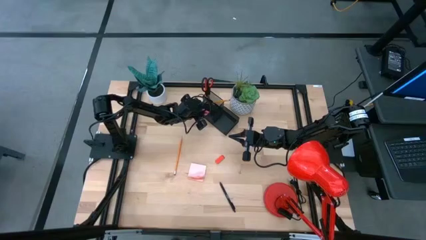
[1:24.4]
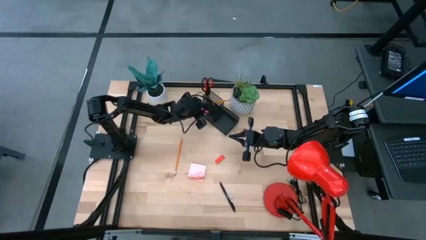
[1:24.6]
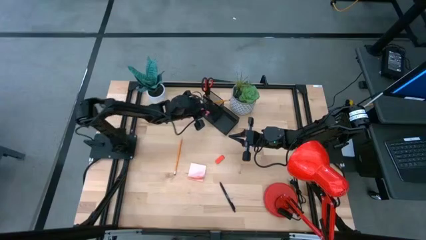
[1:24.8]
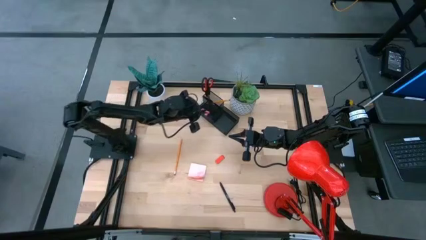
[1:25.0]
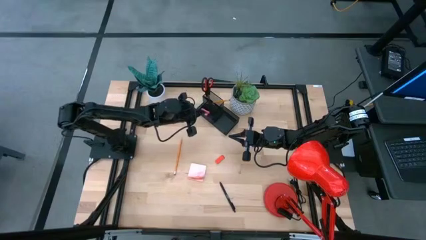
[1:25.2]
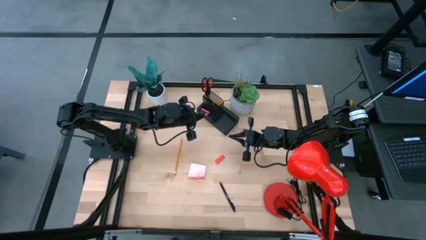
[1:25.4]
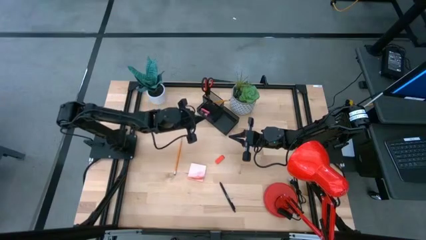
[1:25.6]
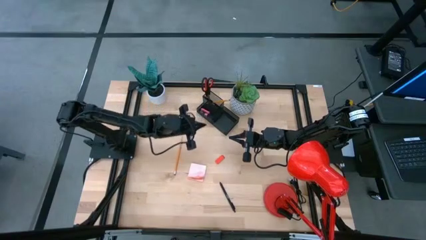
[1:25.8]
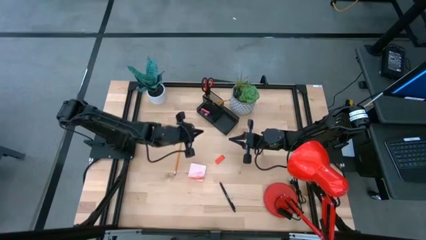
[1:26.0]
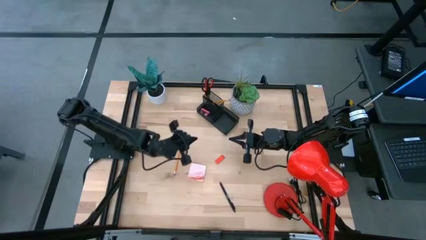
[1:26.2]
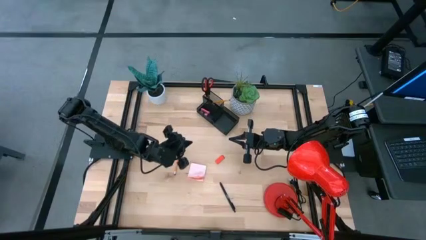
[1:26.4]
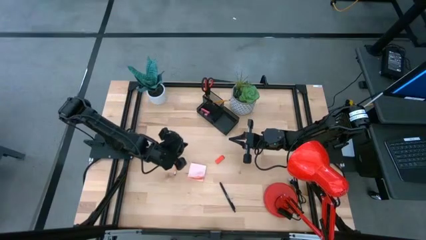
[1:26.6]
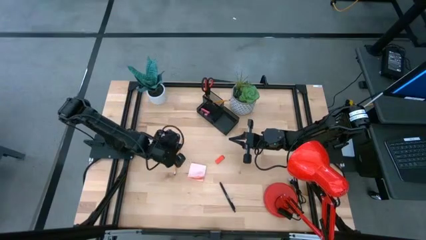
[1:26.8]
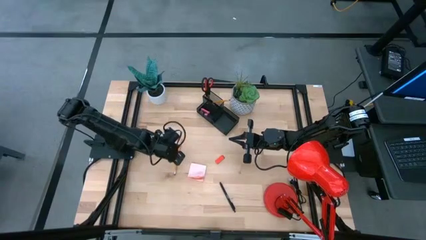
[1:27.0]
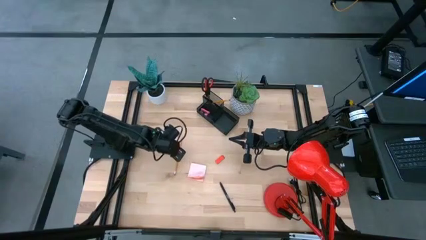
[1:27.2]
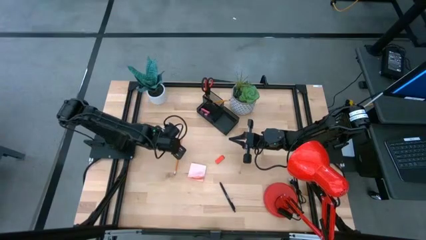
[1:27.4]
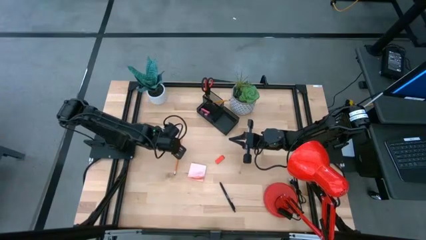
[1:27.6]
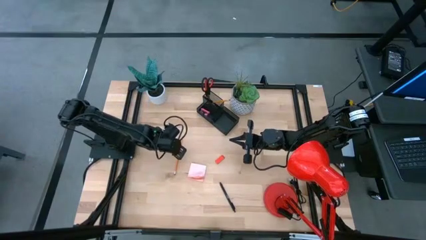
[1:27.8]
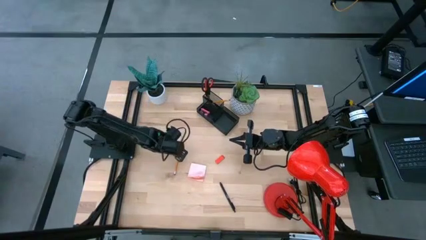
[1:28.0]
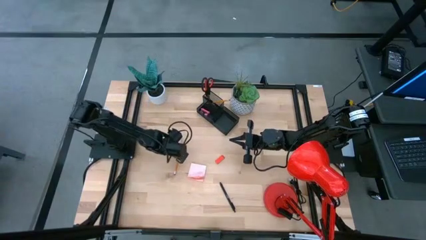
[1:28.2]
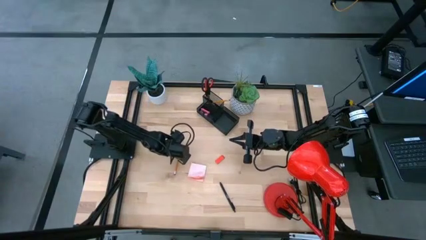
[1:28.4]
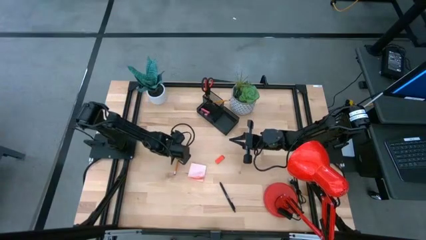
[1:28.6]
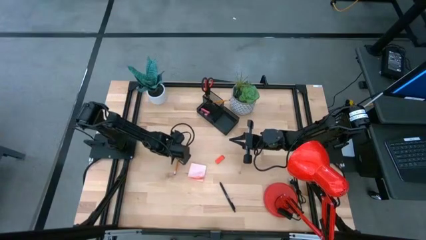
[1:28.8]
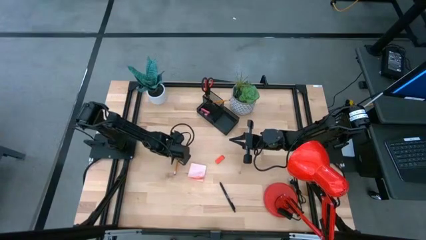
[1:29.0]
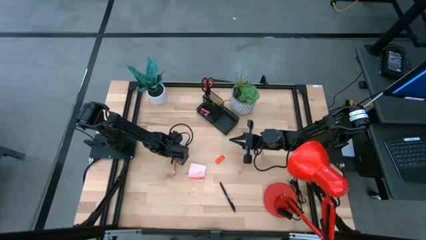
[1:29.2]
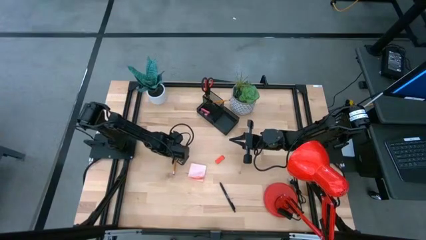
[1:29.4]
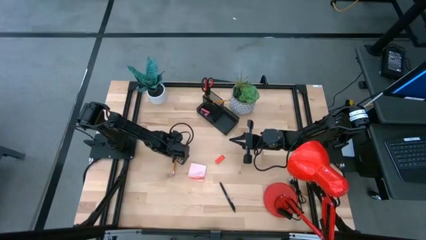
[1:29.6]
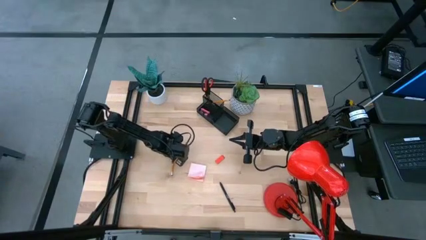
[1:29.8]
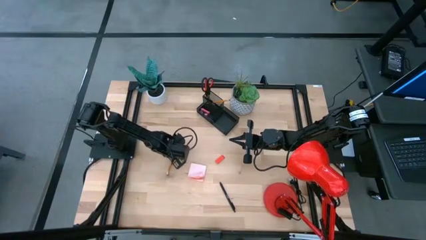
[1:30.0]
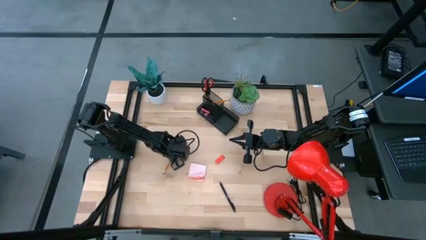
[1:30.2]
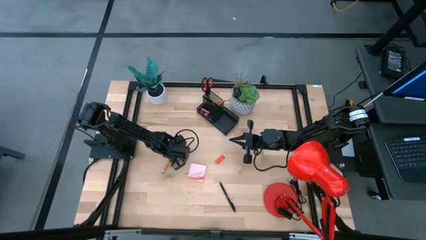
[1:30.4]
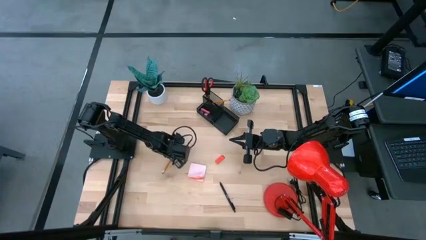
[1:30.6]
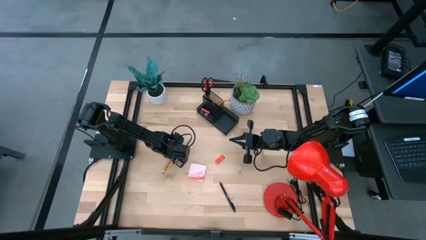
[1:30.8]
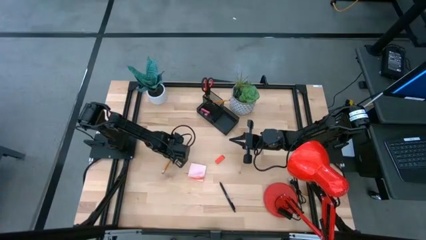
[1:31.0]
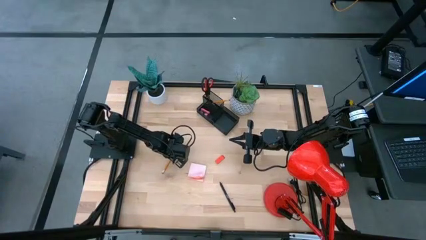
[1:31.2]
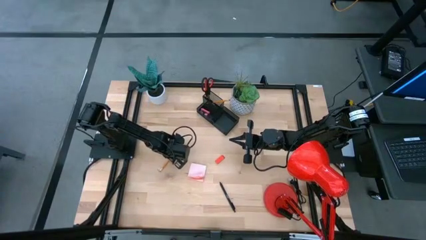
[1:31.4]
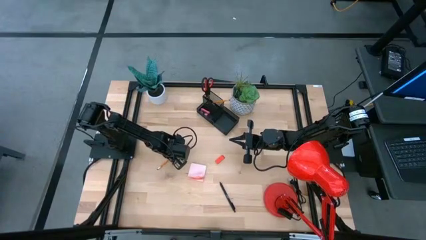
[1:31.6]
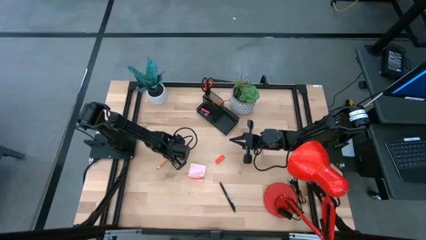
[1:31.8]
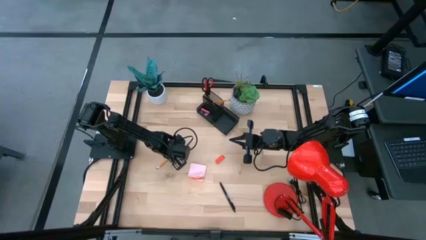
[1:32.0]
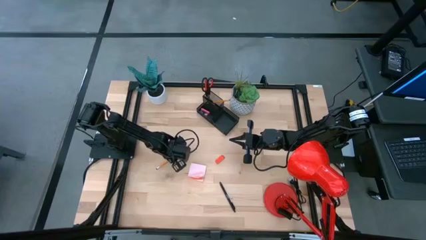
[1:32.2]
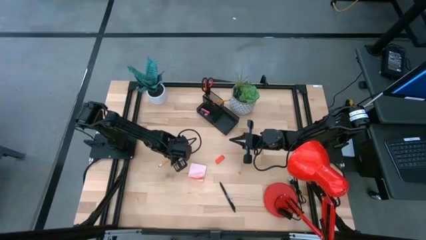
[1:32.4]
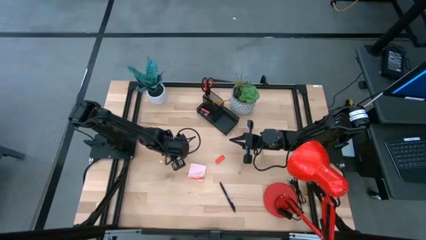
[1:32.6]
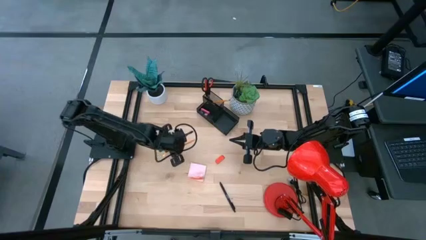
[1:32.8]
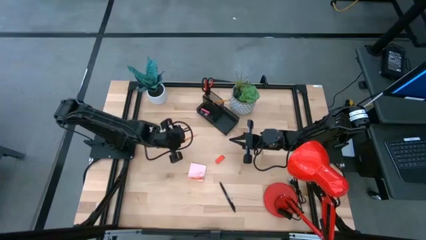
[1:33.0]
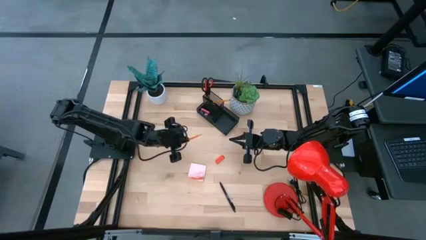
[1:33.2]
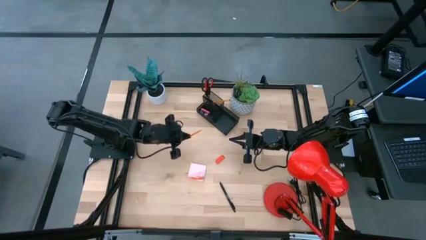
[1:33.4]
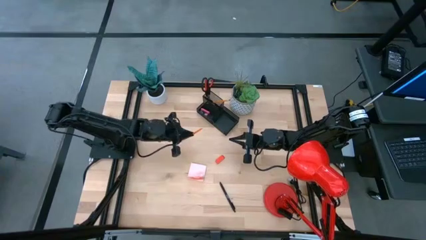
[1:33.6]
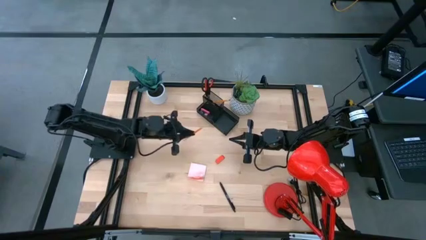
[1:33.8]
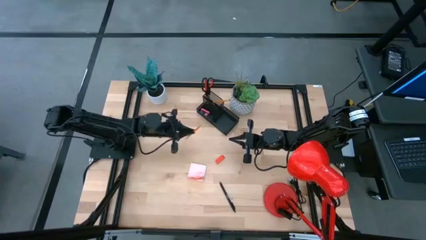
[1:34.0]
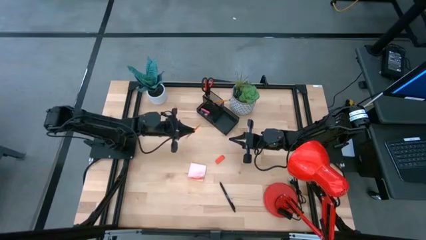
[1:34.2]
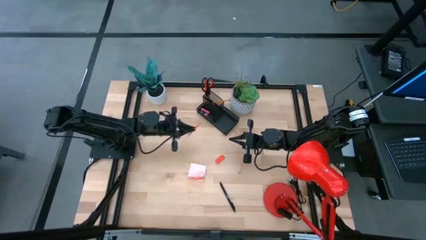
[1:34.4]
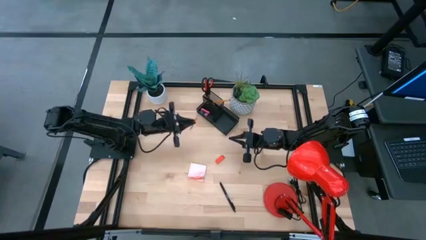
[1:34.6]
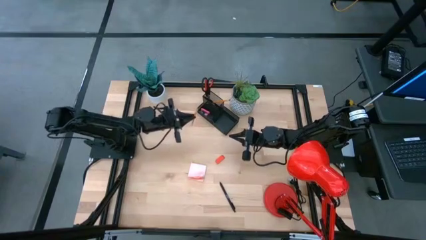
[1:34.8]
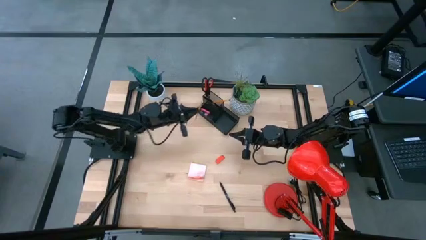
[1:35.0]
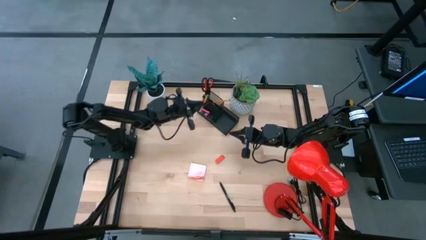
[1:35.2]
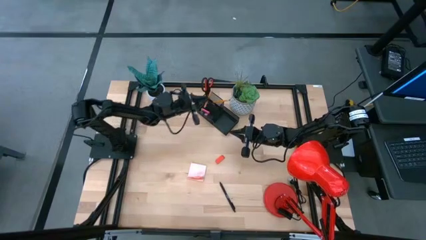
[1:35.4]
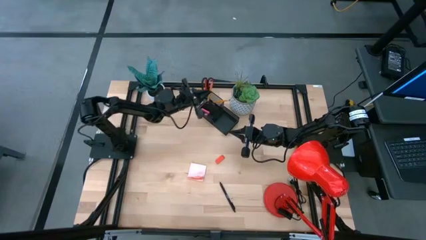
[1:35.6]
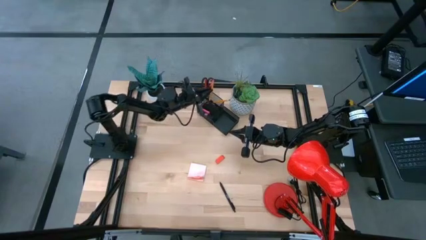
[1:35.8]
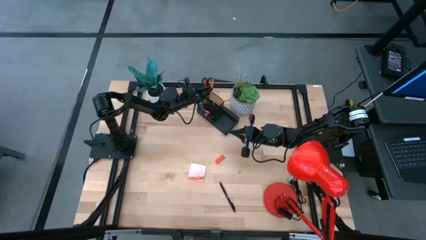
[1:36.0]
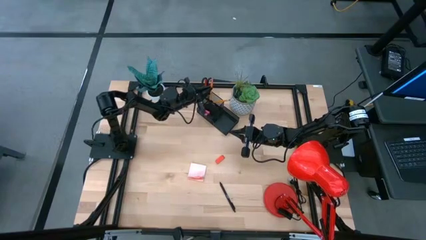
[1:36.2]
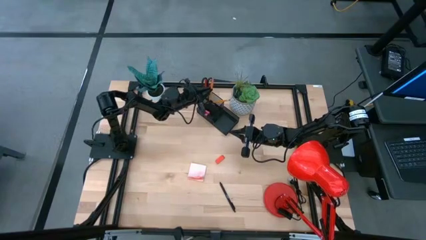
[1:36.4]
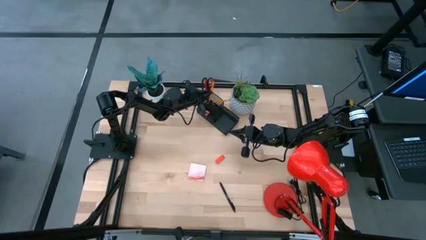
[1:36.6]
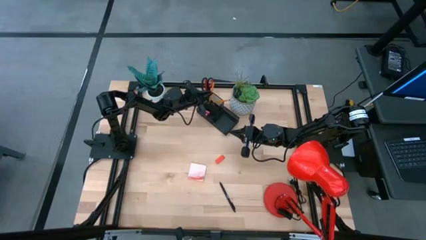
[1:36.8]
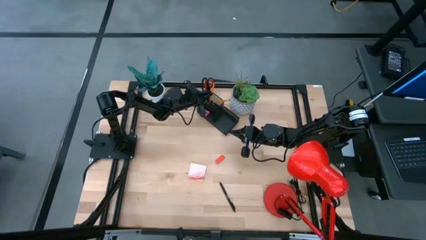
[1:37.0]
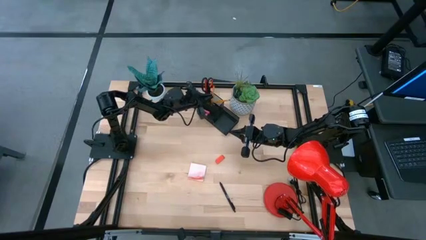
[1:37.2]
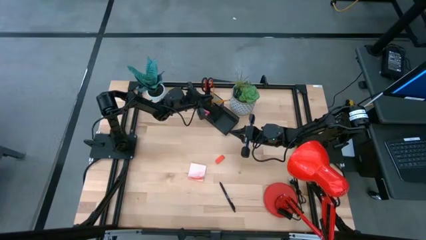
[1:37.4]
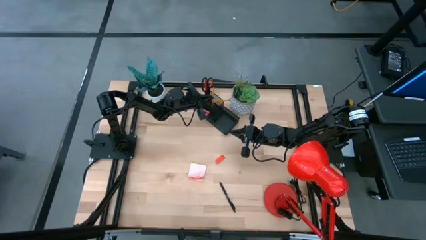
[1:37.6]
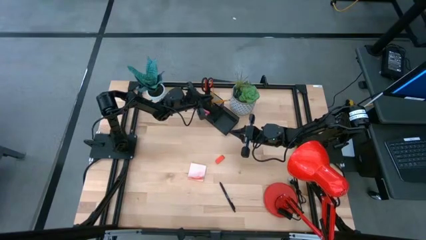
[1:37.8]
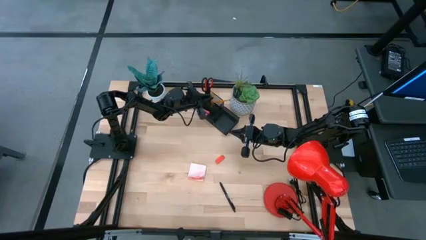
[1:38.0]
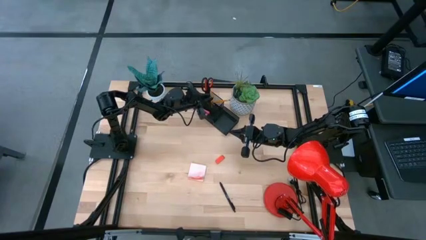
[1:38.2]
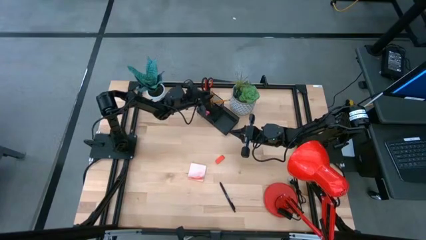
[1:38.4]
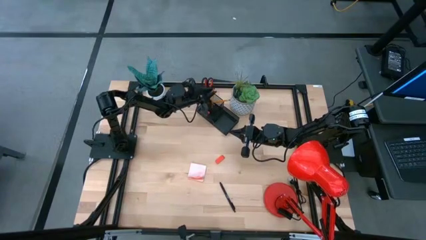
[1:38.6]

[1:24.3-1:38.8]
Task: Pick and place office supplies into organizer
Put the orange pencil into the black desk organizer
